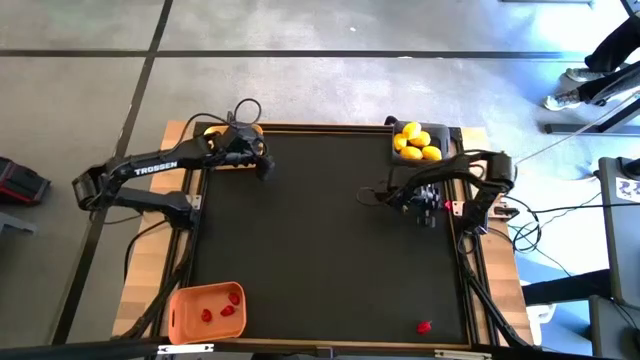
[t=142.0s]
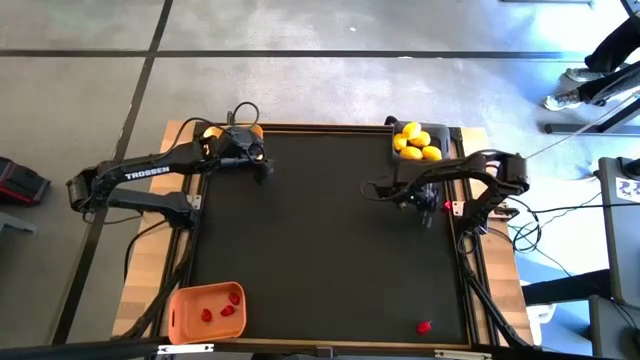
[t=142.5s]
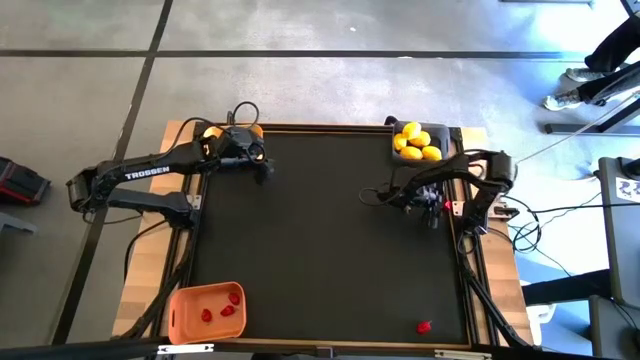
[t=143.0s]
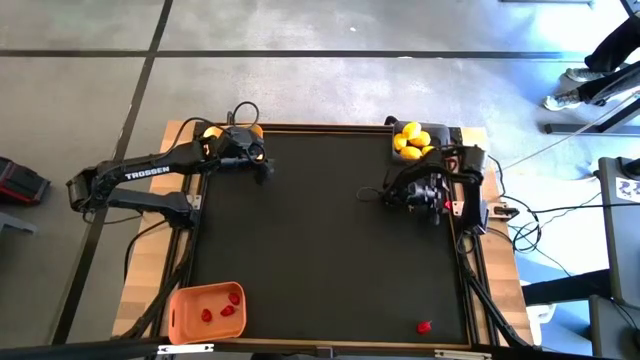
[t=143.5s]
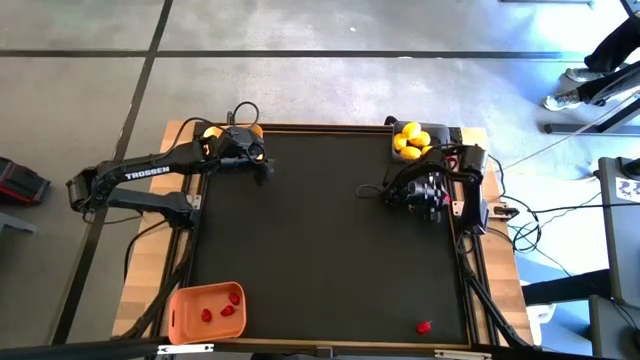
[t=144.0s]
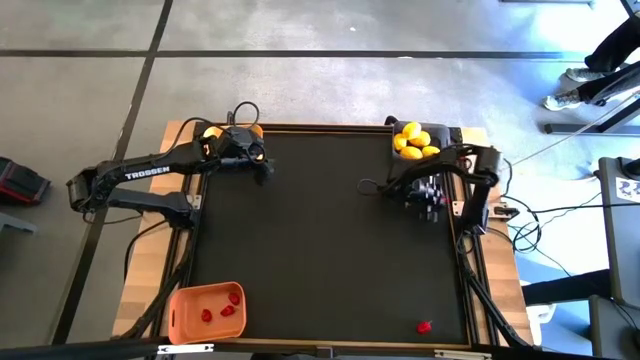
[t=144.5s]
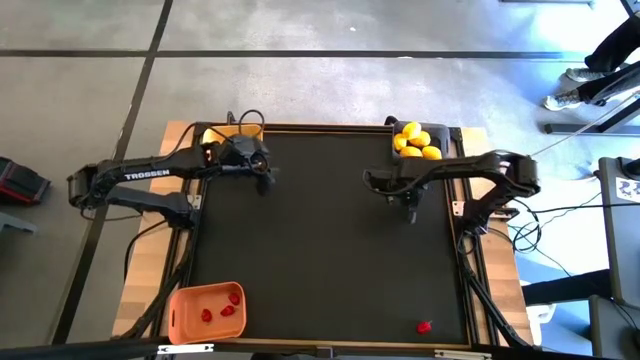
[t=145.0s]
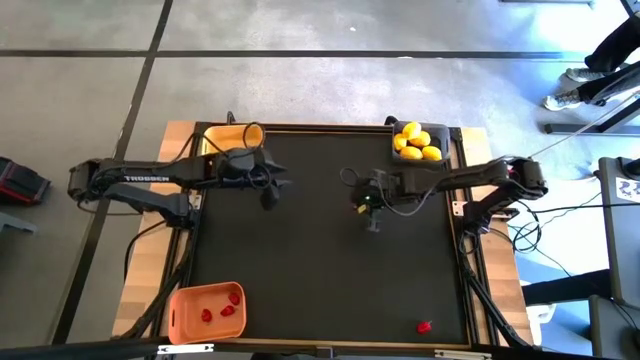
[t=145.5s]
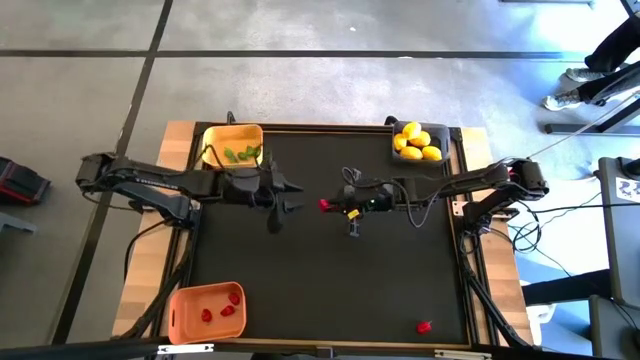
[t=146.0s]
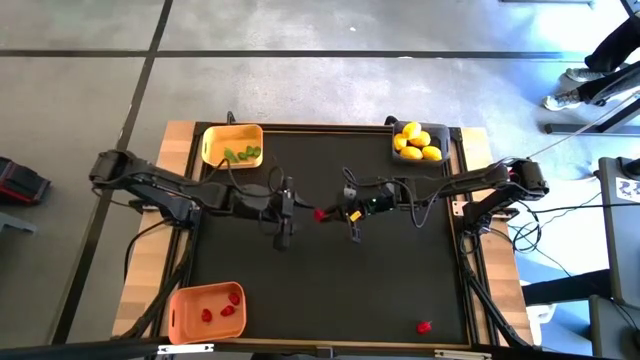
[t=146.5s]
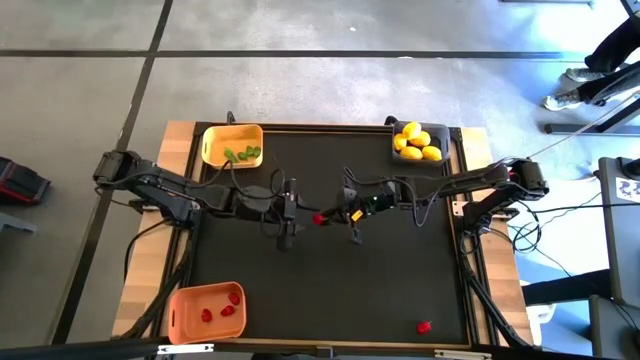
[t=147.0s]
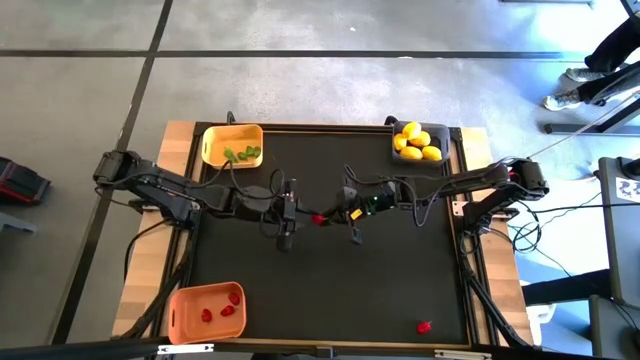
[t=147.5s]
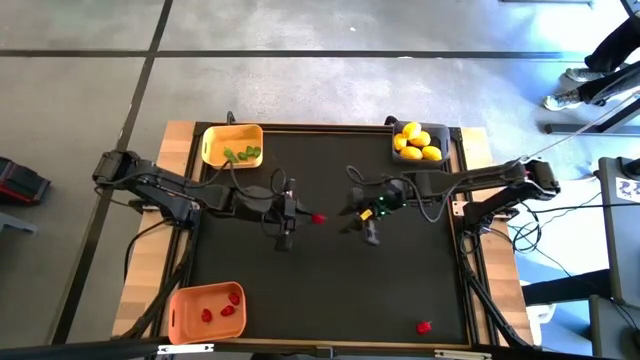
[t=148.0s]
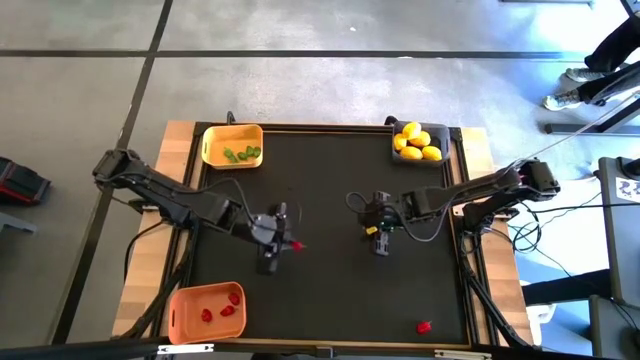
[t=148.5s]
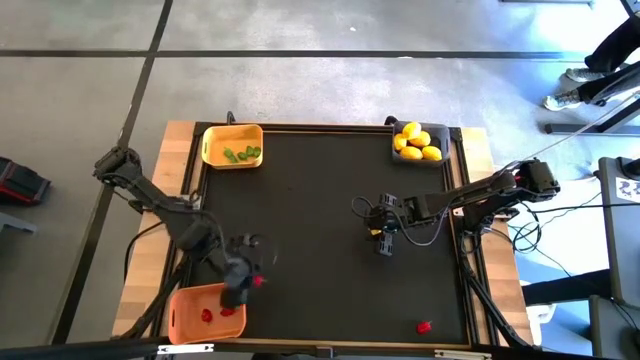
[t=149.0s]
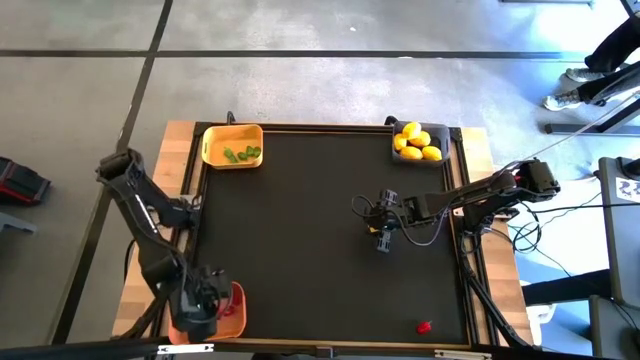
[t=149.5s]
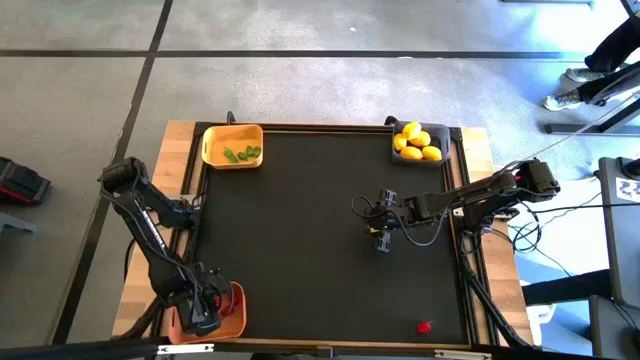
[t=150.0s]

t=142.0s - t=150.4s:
Task: Sort produce into baskets
Put the red bell pepper into the orange bin

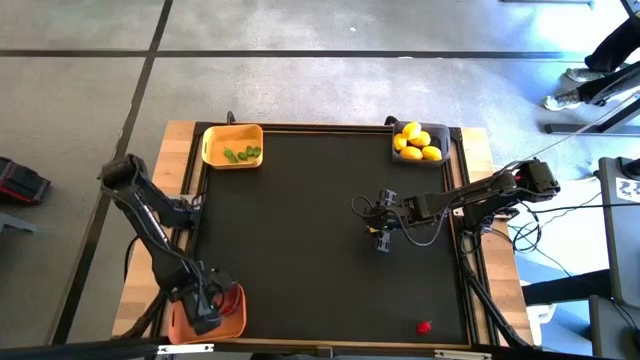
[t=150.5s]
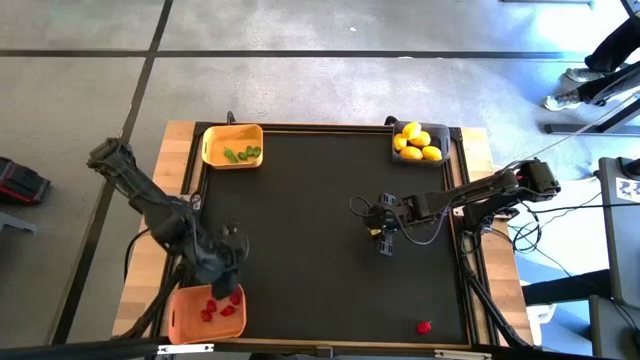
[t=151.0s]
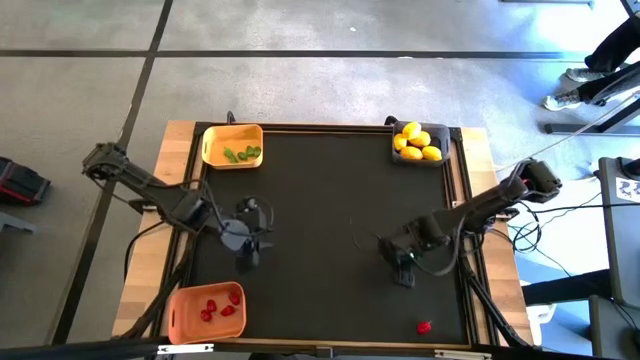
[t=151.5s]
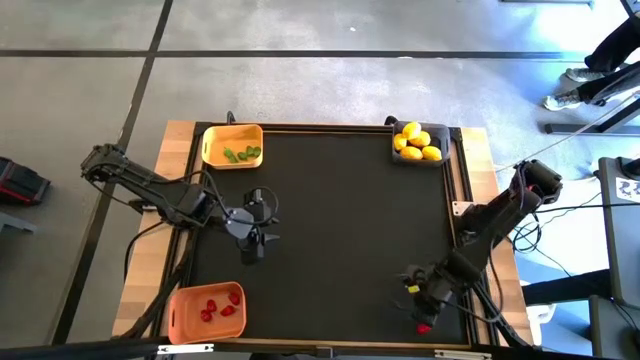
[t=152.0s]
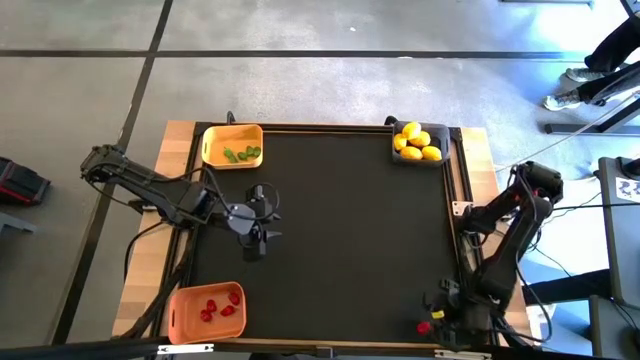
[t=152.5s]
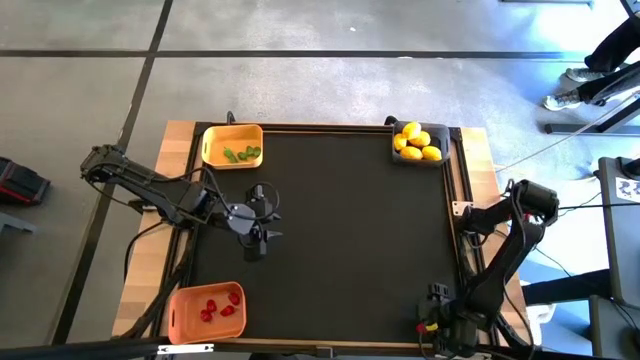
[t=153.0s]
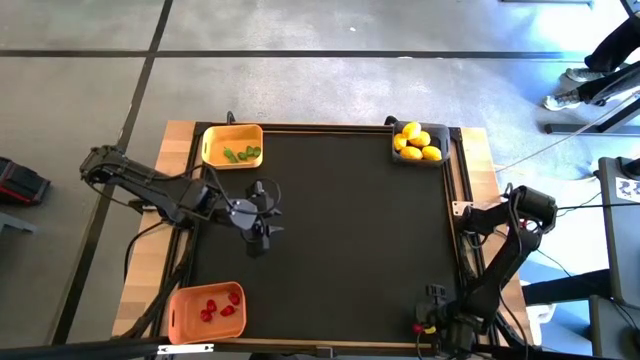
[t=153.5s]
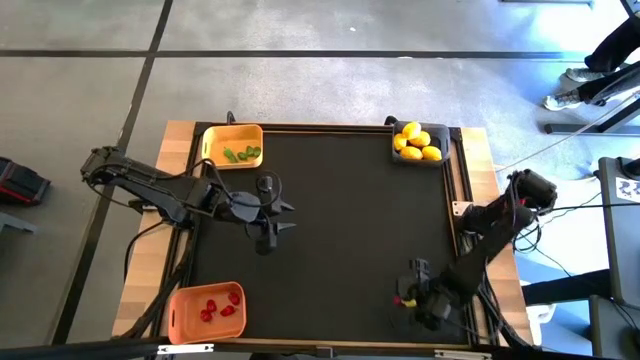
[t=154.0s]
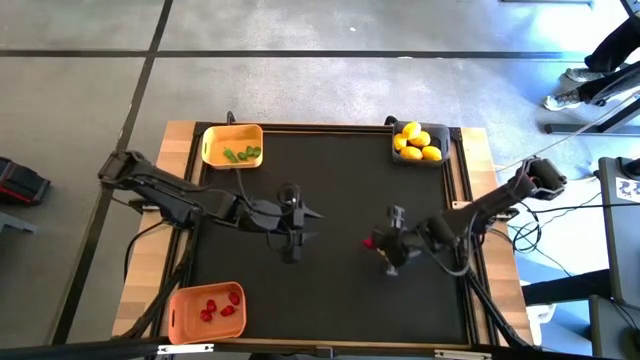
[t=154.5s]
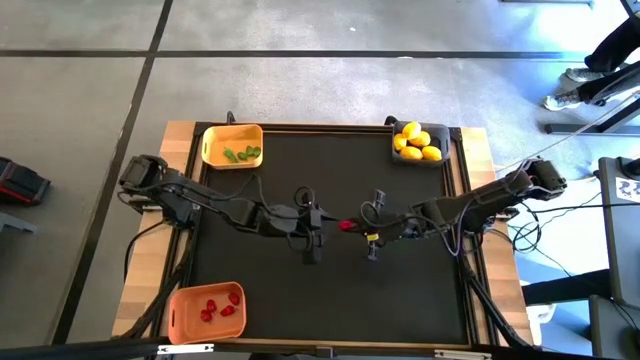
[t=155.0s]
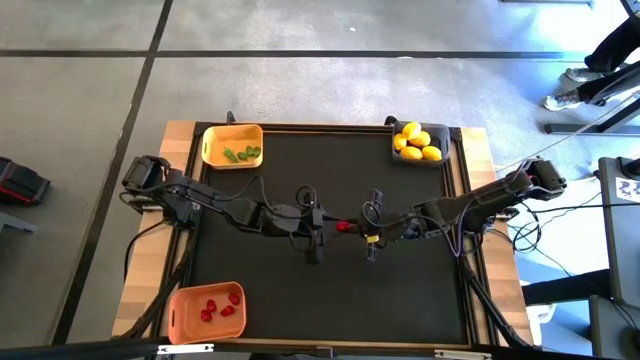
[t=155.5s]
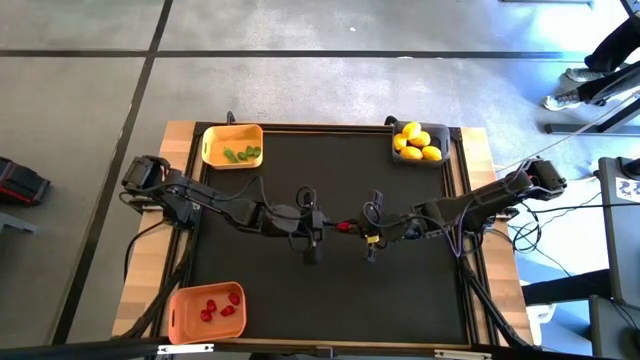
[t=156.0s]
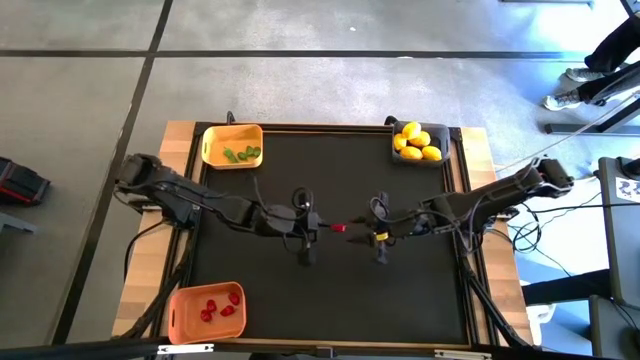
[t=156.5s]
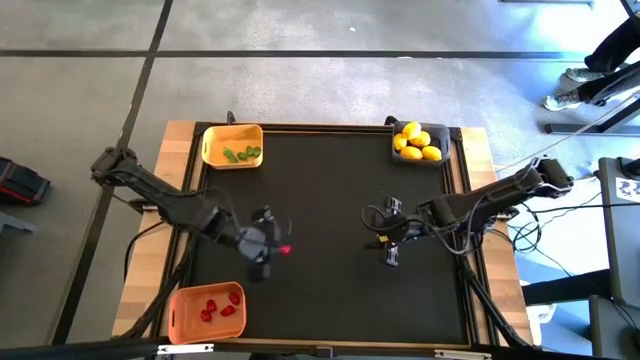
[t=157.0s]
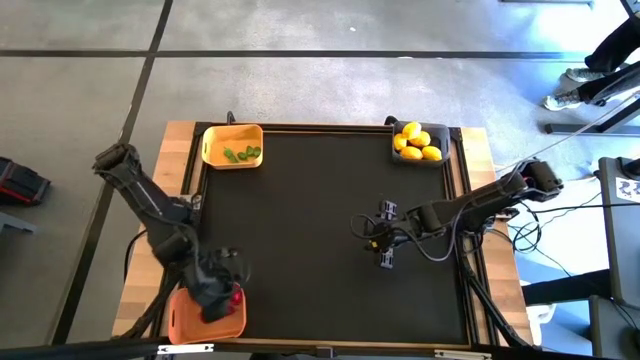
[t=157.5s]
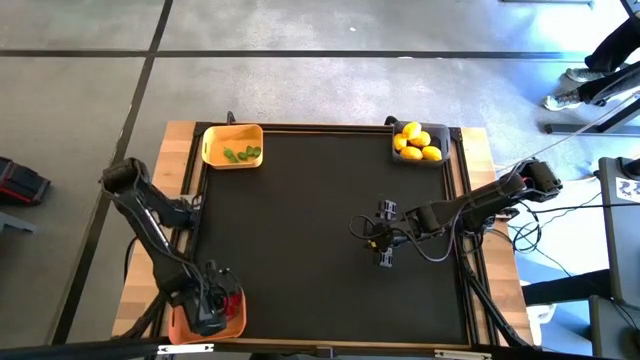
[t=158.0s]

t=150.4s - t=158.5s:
Put the red bell pepper into the orange bin

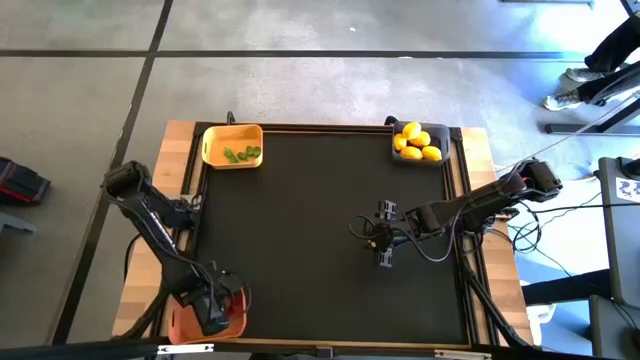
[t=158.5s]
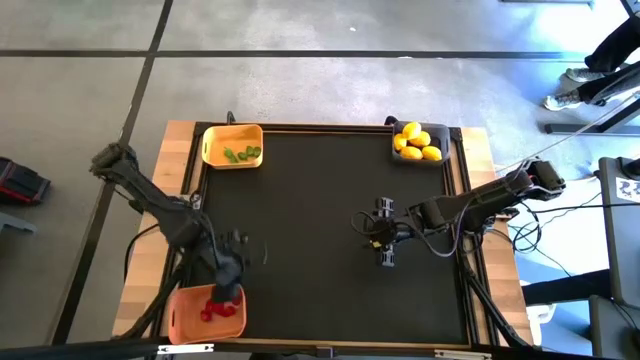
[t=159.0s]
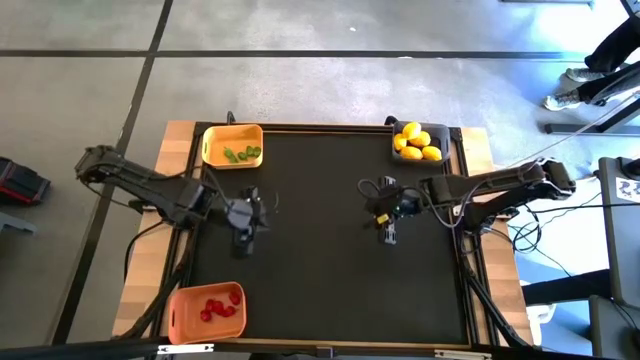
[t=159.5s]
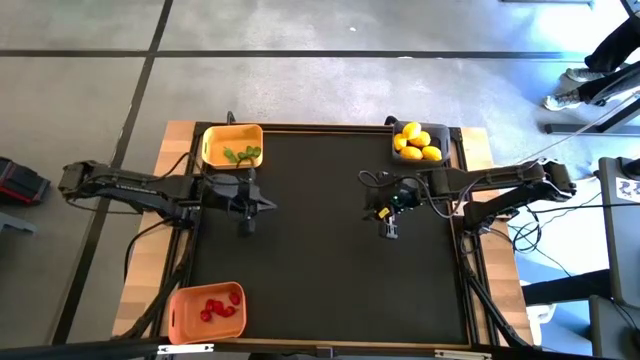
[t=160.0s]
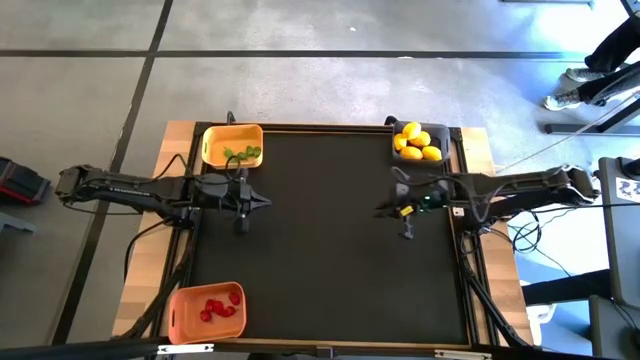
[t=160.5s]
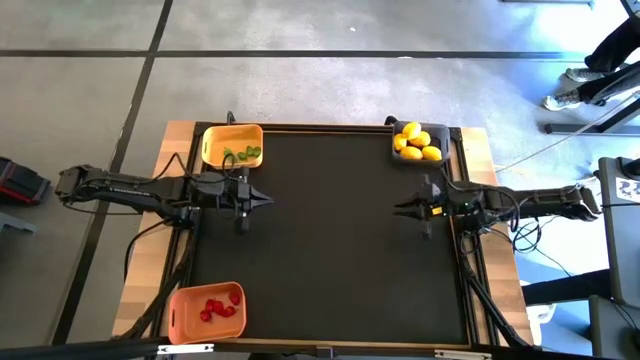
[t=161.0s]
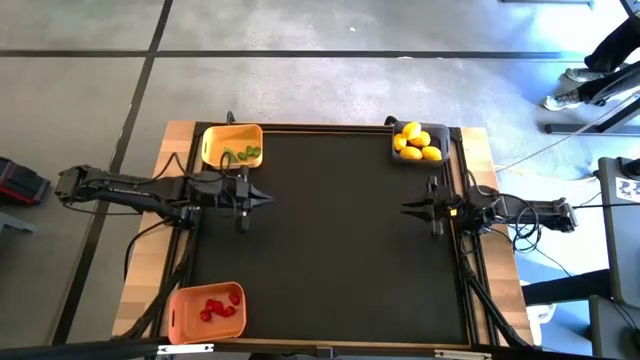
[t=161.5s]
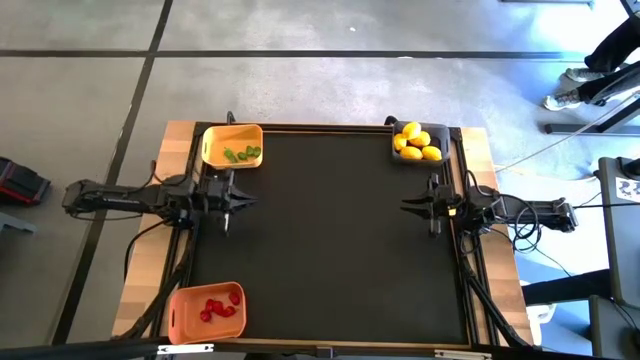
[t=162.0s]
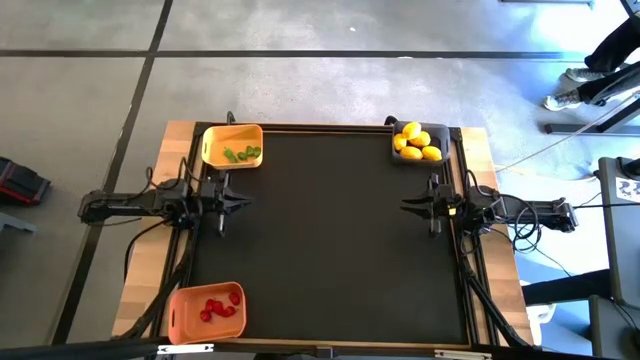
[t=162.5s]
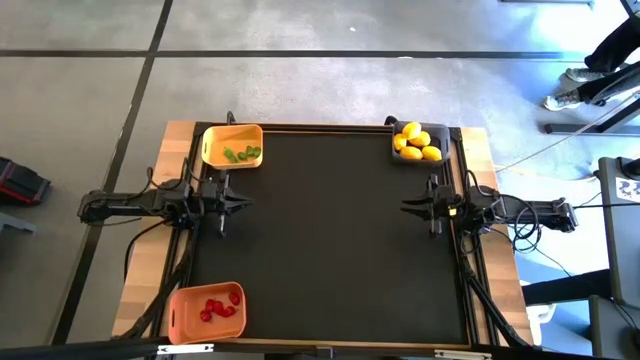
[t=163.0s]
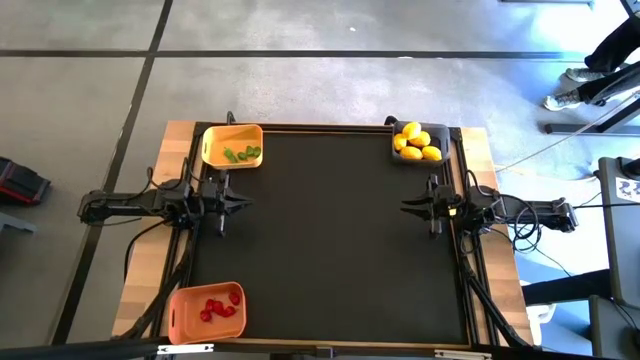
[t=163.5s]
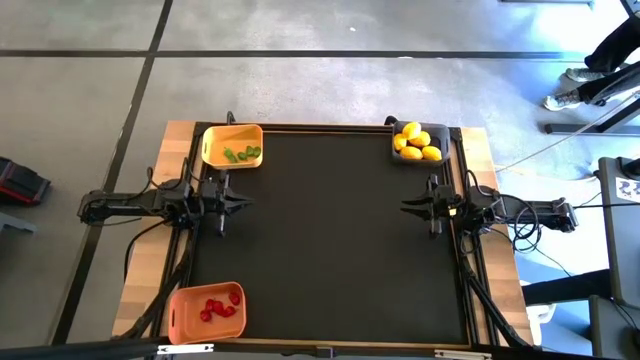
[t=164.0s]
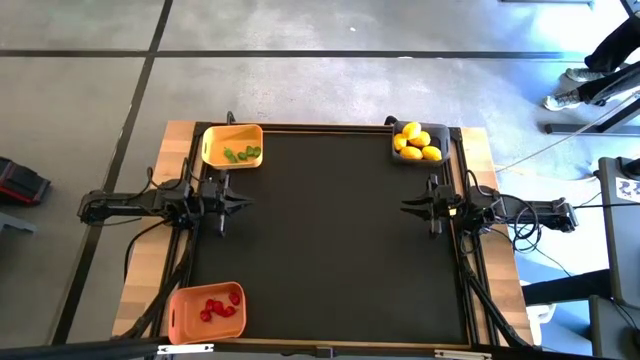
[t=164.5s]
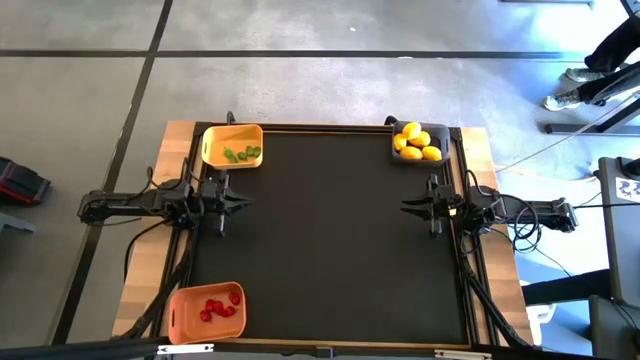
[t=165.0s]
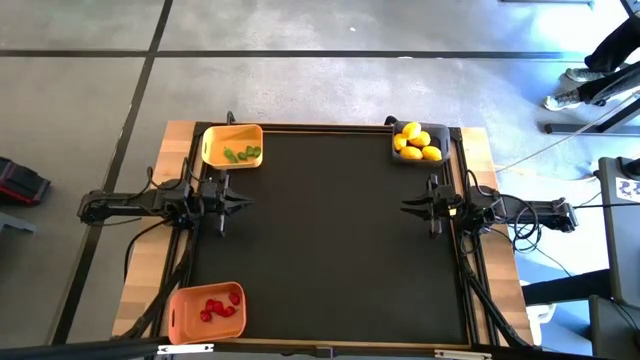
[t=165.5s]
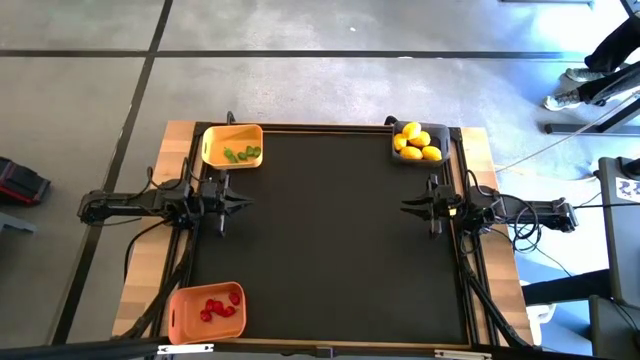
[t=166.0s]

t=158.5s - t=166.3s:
Return to Home Position
